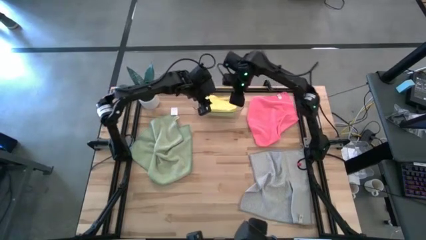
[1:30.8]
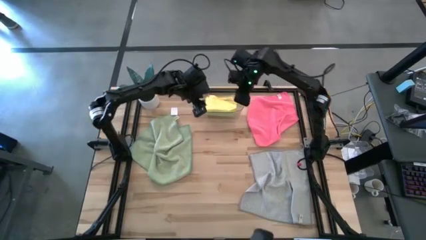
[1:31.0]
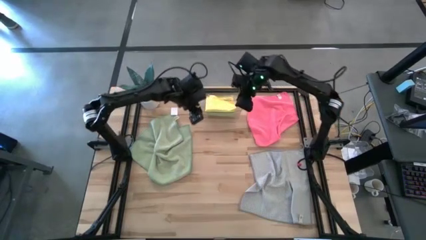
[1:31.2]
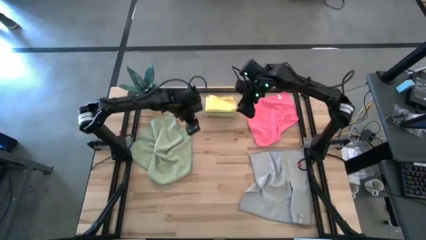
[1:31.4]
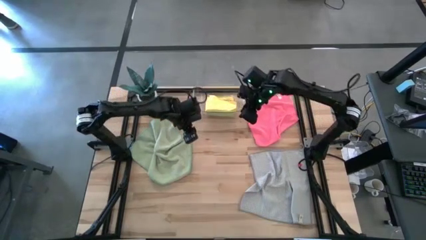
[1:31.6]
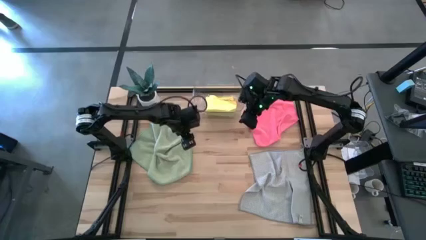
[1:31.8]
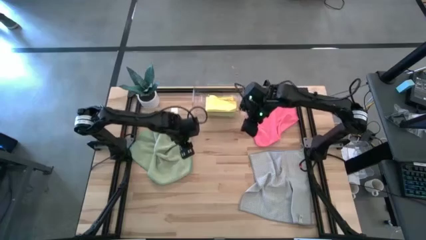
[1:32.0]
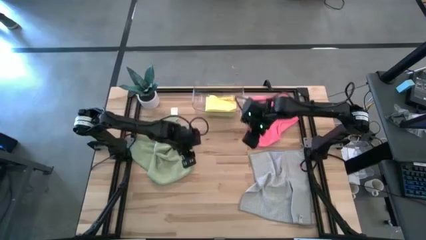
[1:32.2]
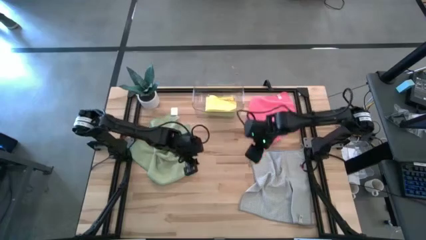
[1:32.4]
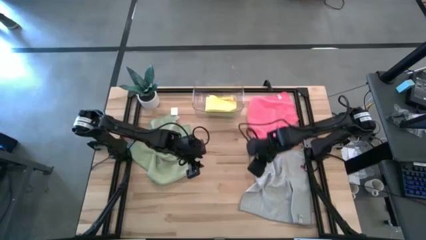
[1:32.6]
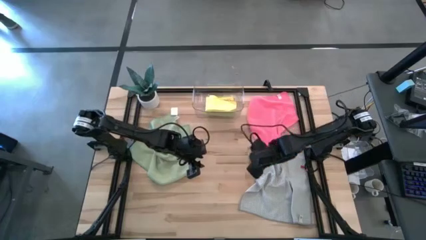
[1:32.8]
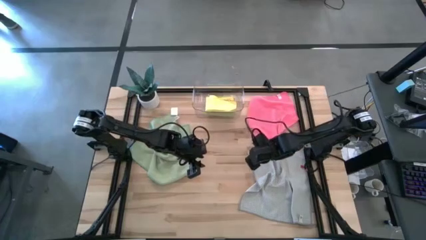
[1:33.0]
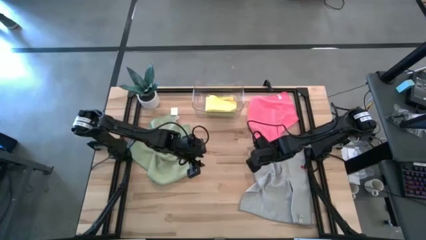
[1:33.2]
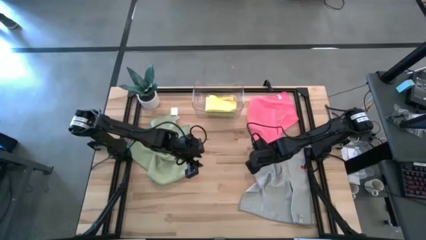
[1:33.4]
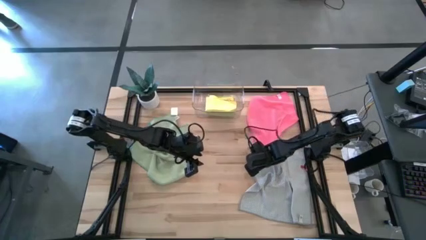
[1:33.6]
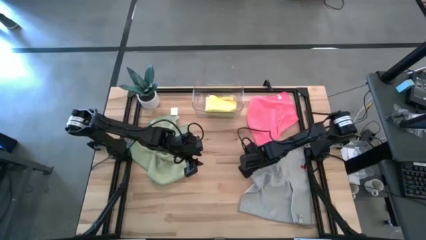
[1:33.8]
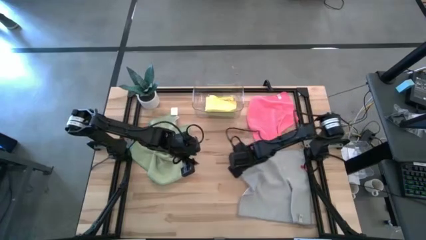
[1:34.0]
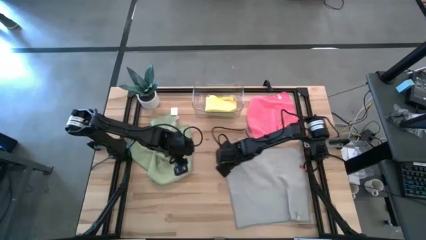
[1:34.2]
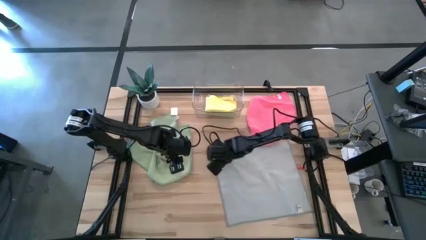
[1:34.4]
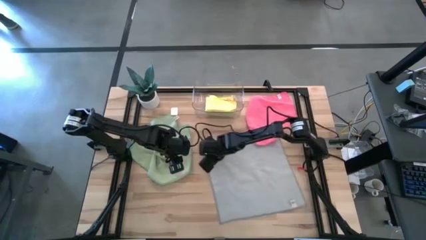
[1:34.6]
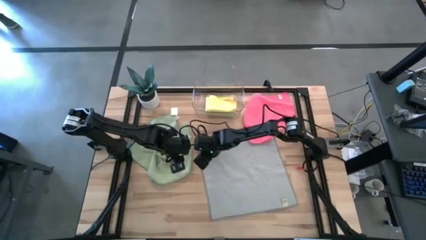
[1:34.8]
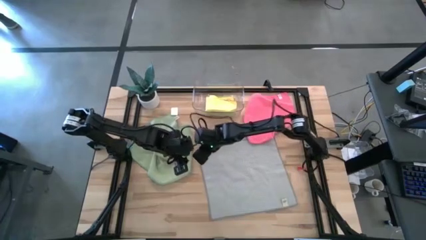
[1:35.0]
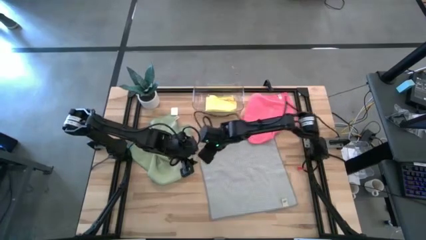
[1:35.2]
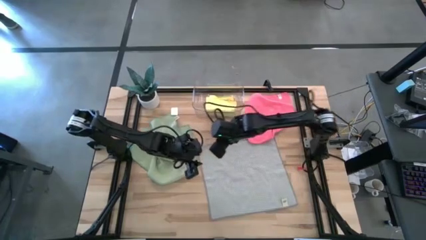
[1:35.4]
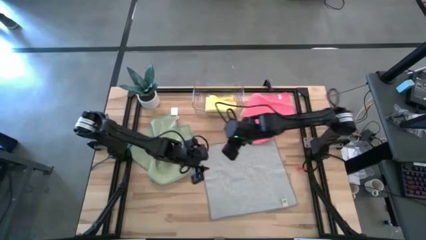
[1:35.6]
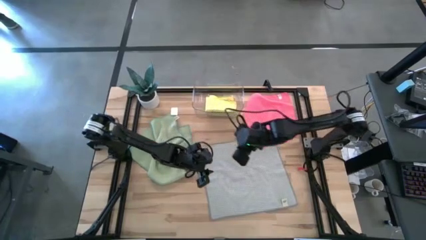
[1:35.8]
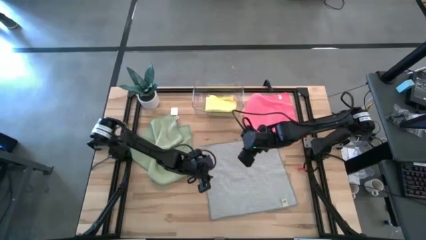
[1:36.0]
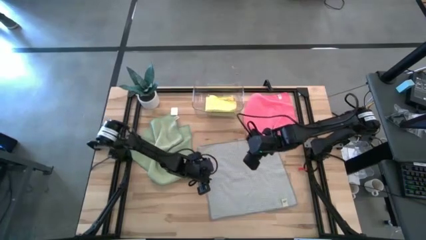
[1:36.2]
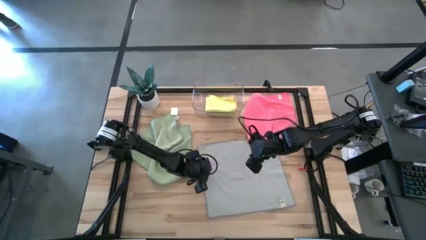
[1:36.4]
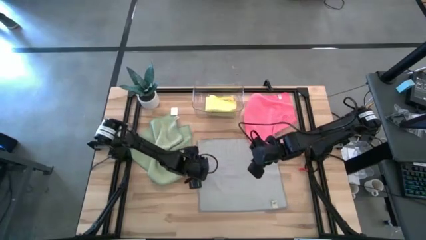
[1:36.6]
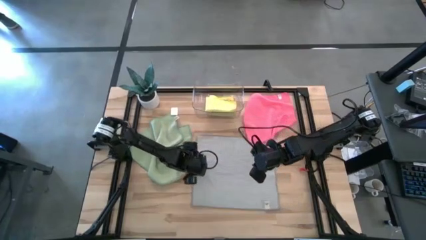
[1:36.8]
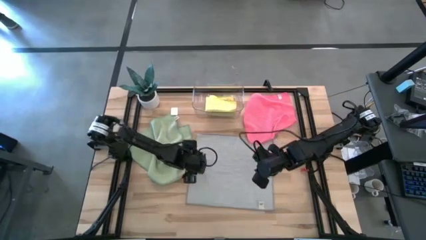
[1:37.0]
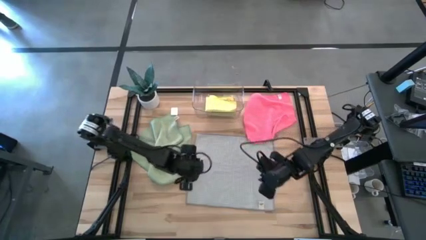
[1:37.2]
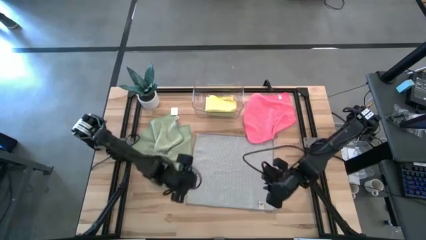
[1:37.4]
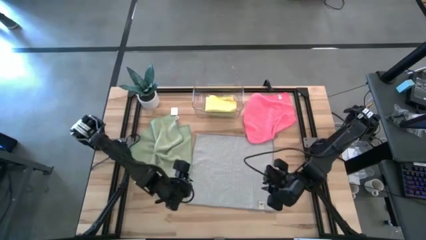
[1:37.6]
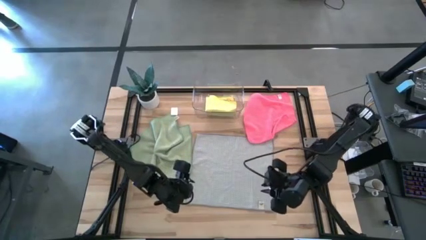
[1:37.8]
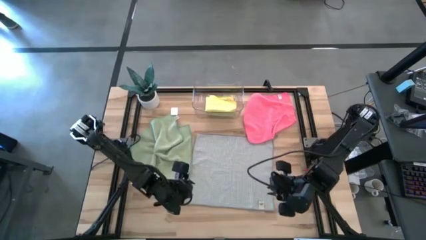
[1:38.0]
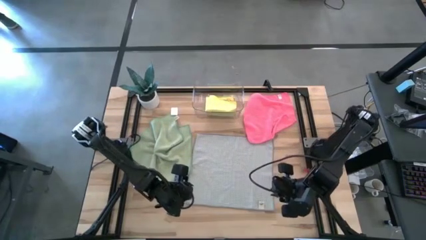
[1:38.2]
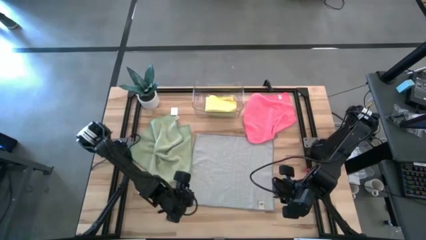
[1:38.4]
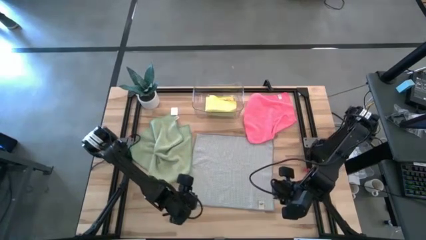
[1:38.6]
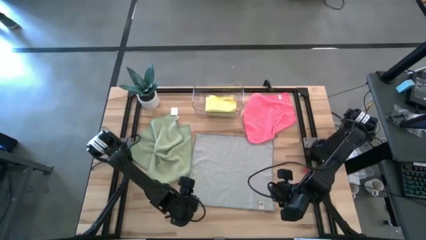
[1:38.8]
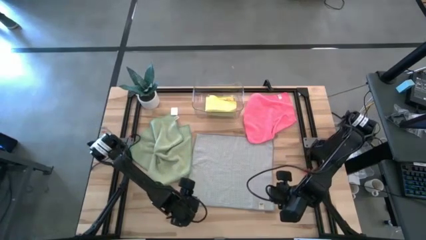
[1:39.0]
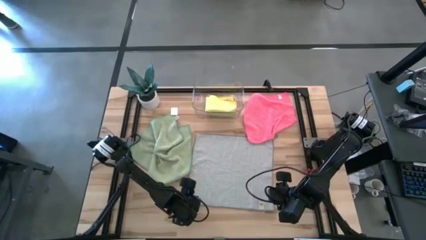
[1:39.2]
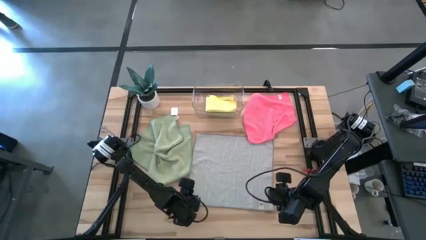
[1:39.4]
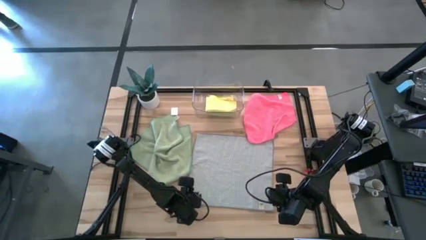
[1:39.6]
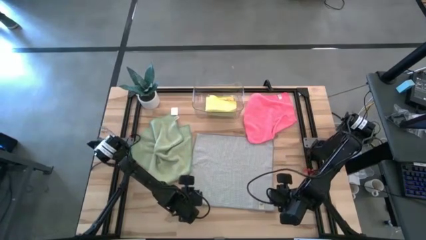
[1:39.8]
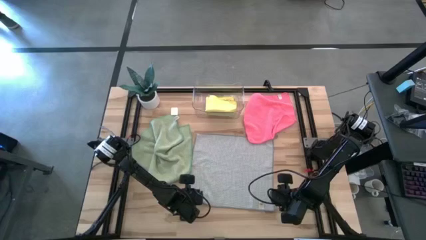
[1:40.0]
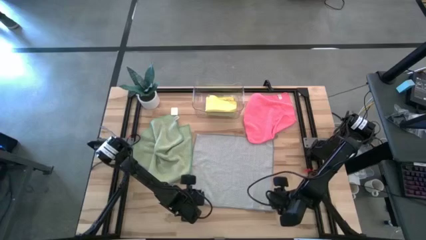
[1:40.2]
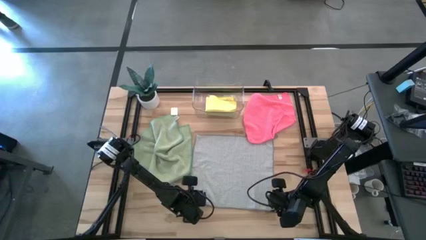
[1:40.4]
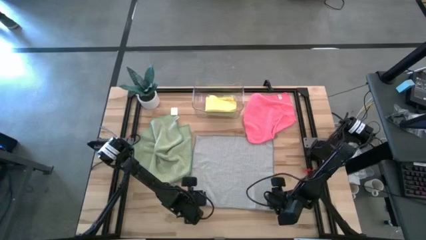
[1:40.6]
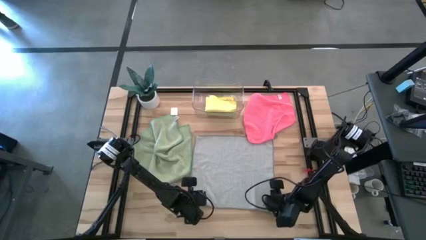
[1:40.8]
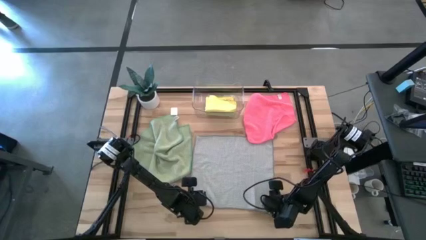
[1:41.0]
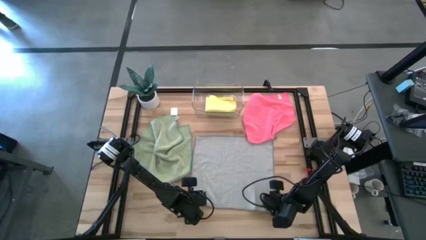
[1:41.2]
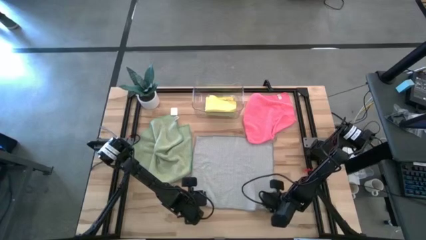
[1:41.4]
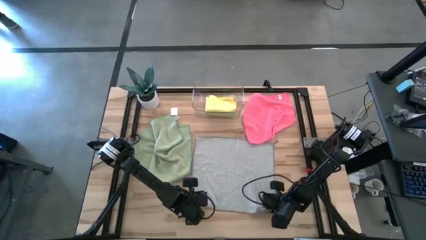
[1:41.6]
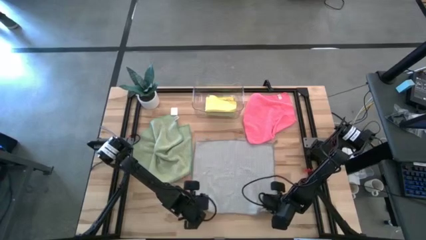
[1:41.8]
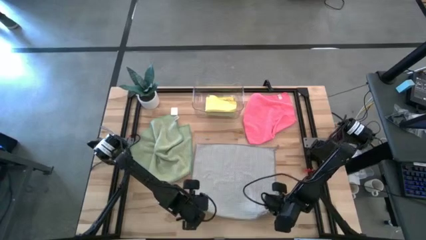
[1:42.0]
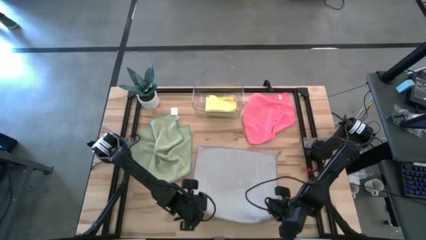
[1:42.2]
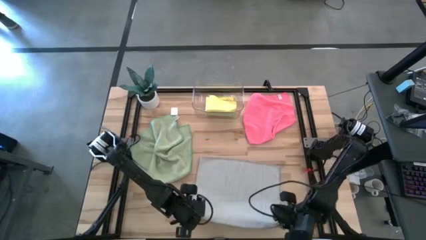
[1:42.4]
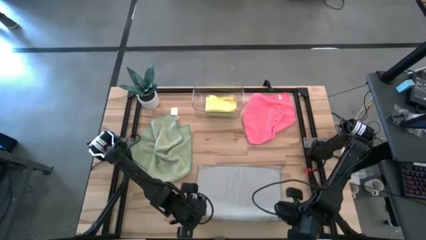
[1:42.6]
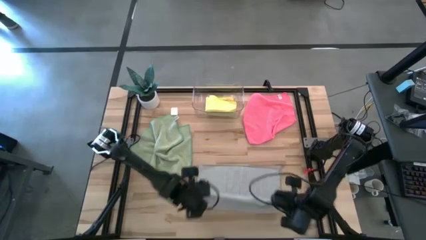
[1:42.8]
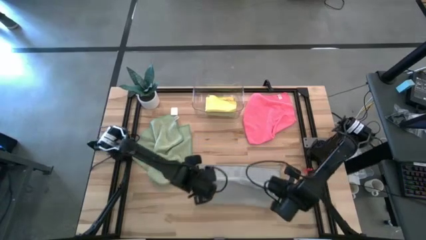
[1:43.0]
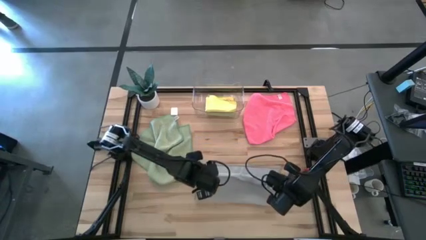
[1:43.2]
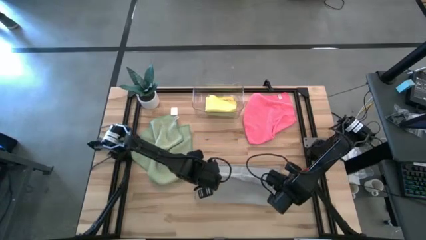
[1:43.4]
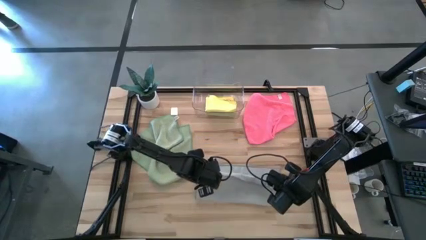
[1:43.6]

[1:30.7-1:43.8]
Task: Fold microfiber towels
Fold the gray microfiber cloth

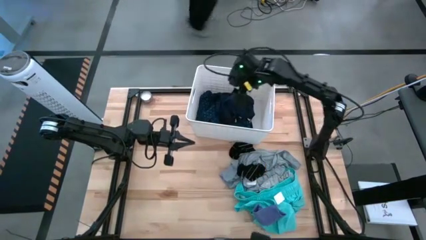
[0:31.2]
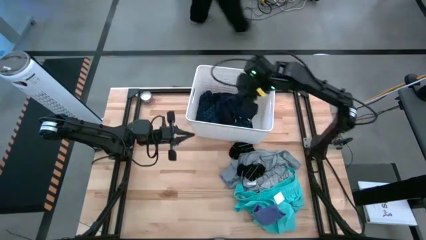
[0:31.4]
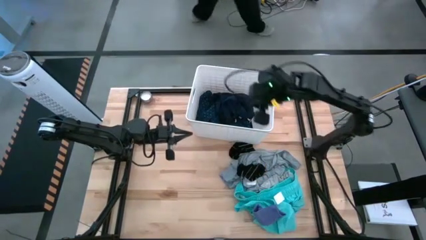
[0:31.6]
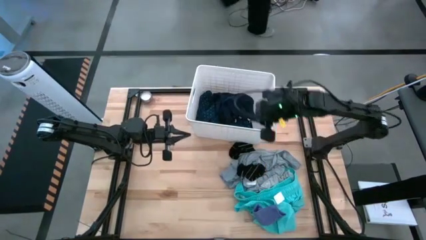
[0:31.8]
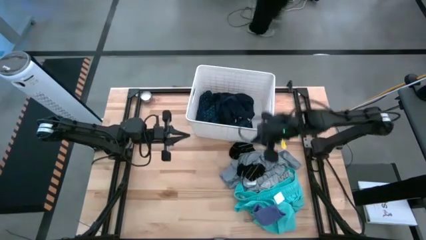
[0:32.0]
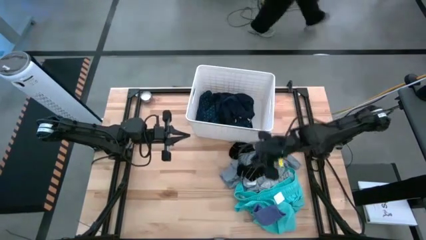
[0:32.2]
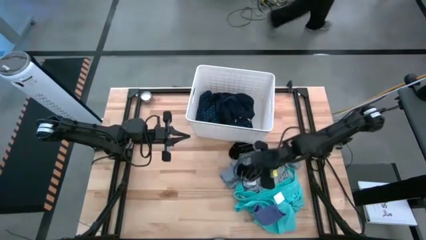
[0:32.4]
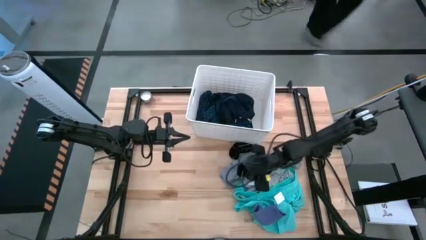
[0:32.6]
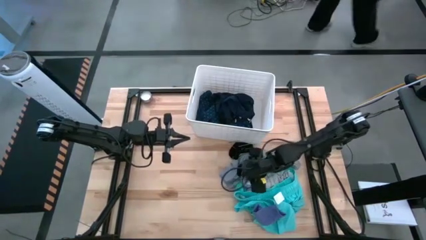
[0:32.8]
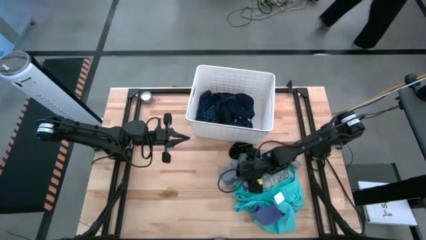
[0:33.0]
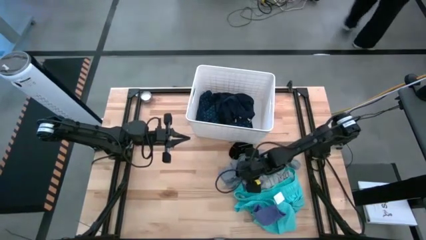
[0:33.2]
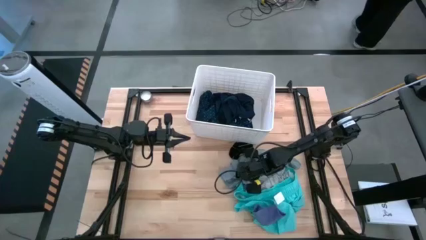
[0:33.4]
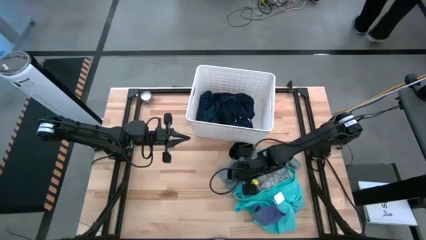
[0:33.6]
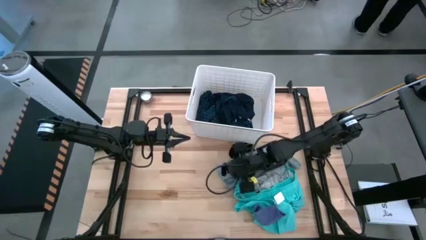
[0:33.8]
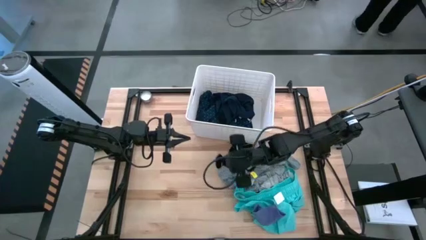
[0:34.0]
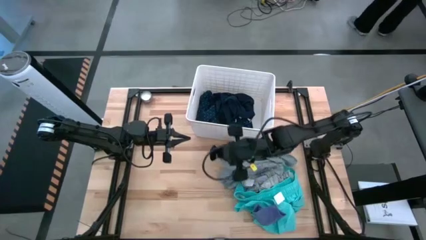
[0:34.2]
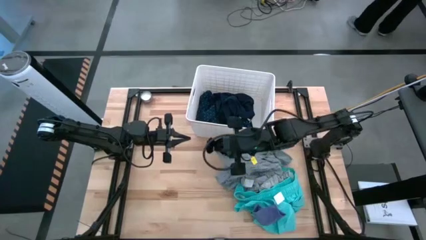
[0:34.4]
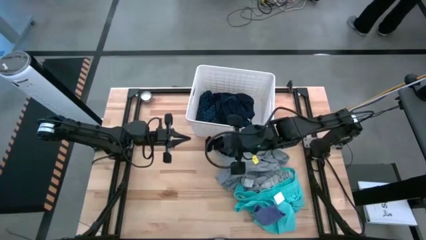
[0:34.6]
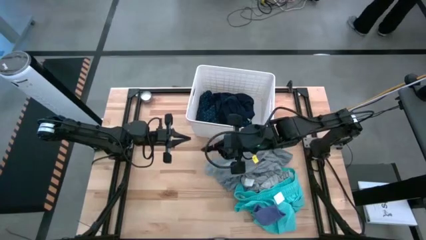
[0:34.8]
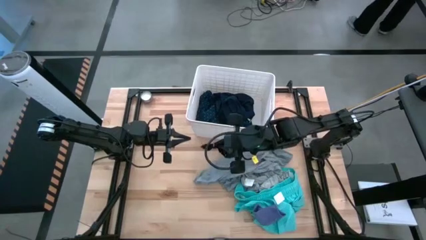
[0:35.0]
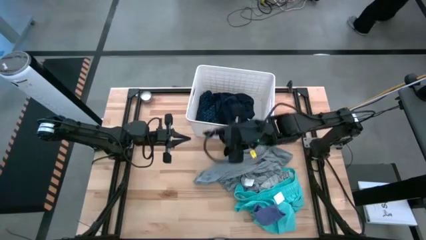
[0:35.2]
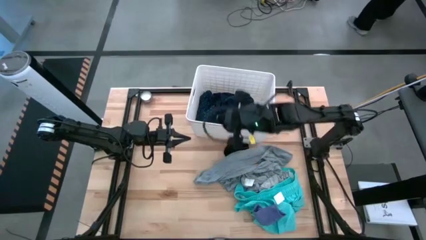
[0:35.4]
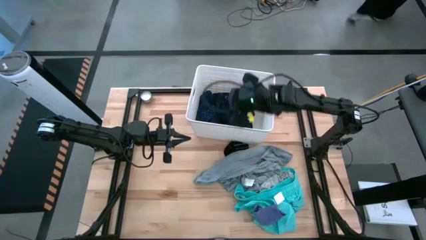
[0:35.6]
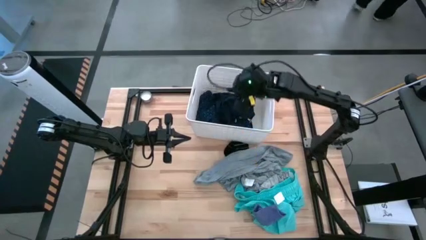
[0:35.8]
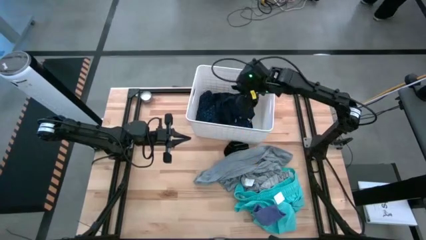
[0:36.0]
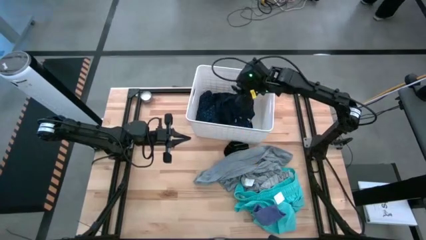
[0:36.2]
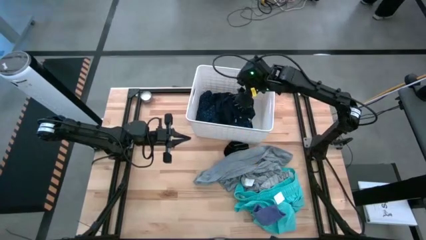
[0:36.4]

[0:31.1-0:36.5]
Task: Sort clothes
Put the bottom black sock into the laundry bin
